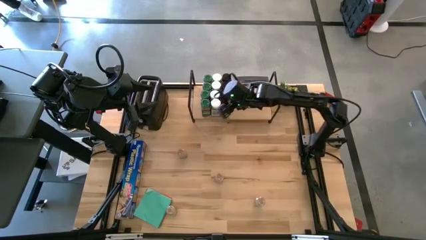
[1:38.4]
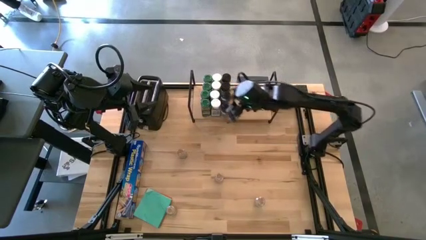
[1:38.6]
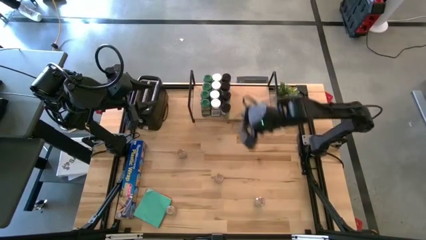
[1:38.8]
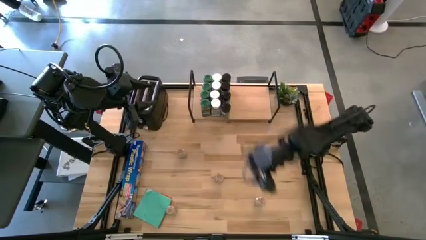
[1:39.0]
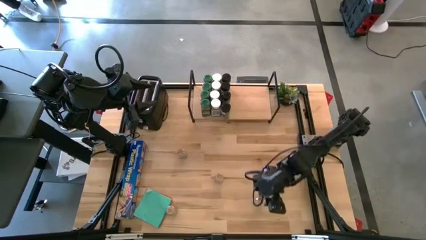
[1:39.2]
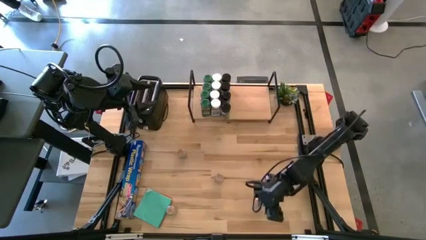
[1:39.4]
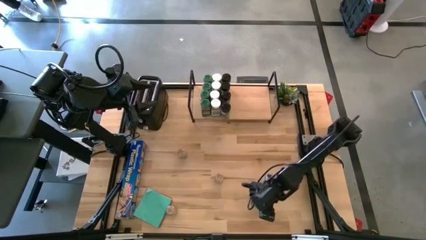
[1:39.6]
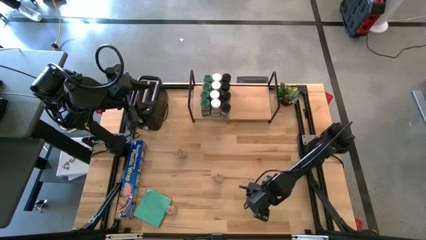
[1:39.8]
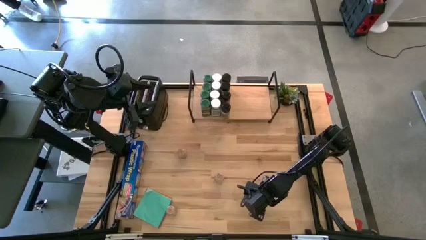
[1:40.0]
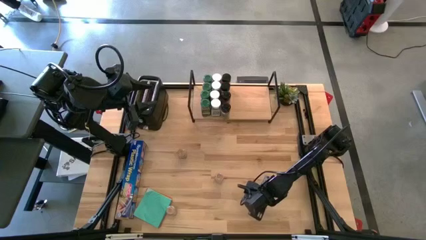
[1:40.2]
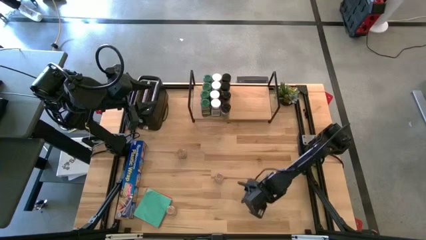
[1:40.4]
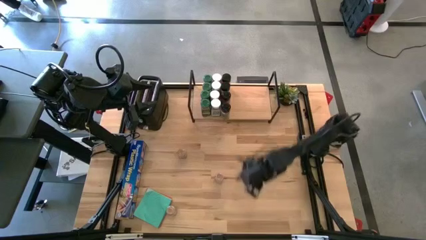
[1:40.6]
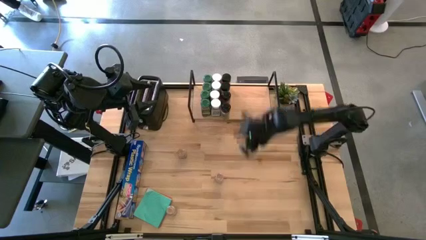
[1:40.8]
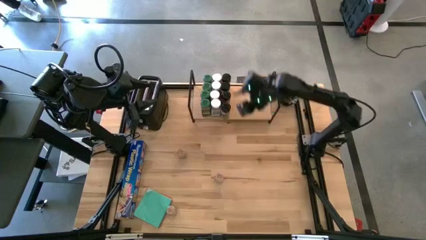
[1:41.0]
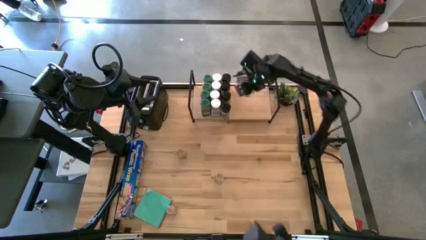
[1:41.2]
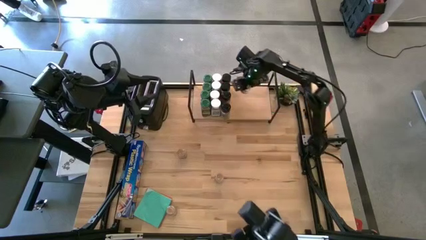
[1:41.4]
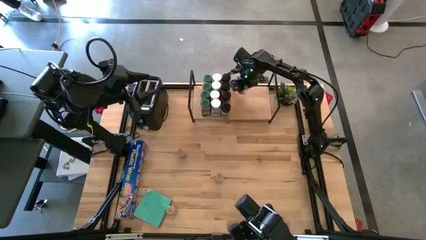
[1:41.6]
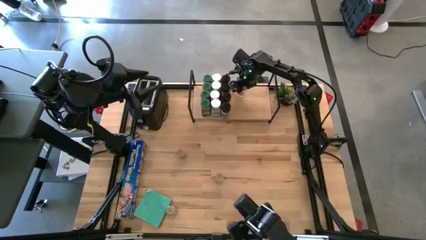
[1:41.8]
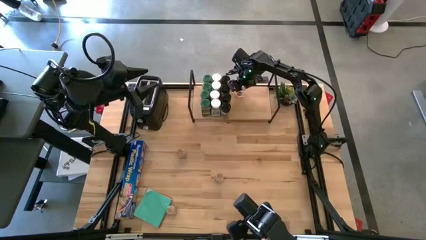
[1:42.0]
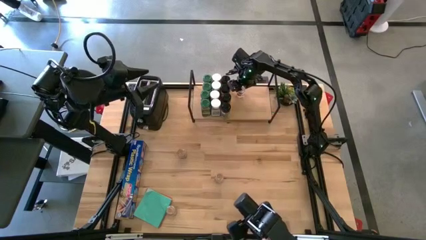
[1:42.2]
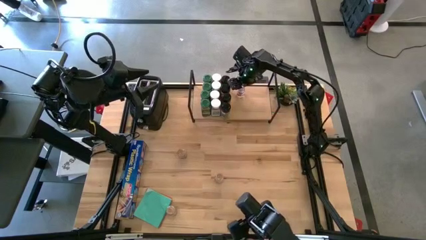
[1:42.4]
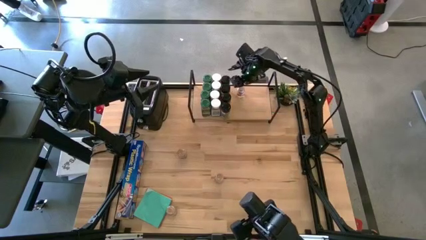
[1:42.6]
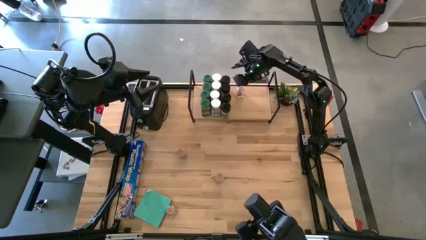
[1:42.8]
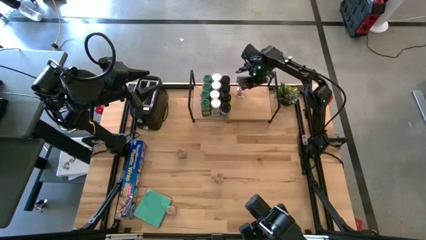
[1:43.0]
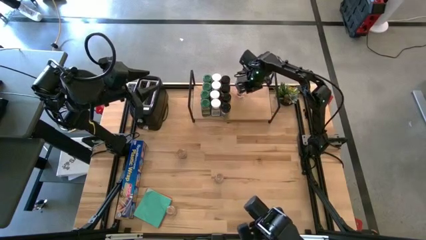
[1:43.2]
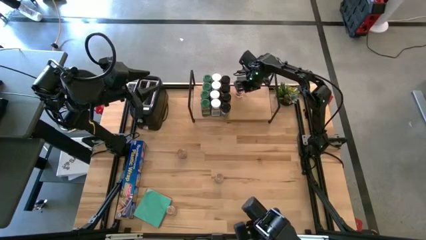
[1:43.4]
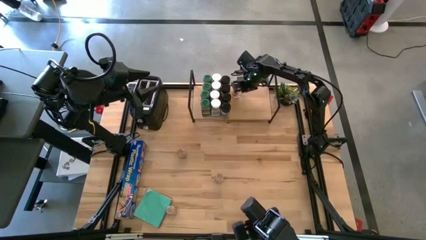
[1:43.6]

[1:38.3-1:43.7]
Task: Shelf spices
Put the bottom right transparent seasoning bottle on the shelf

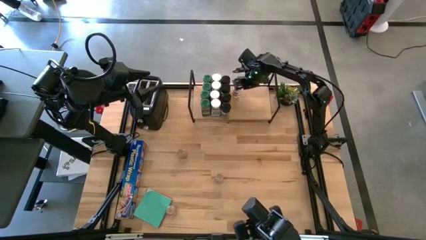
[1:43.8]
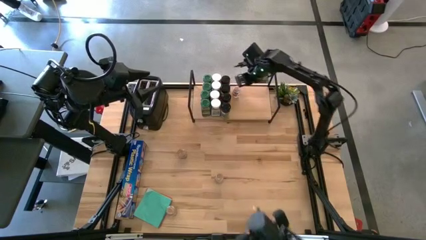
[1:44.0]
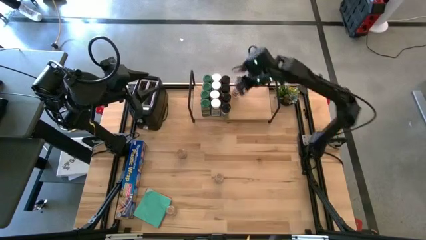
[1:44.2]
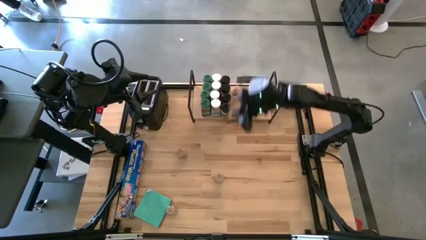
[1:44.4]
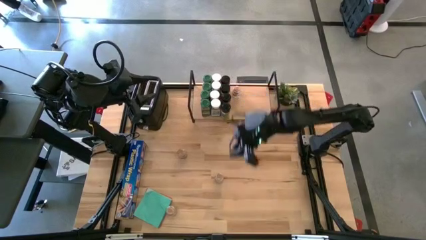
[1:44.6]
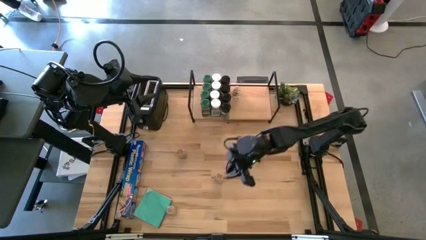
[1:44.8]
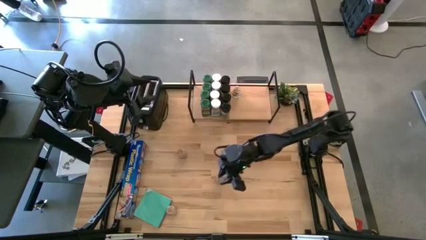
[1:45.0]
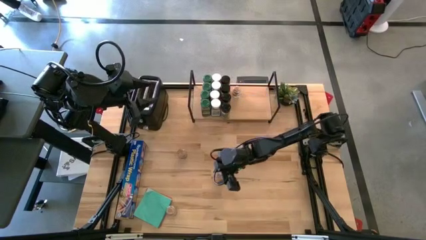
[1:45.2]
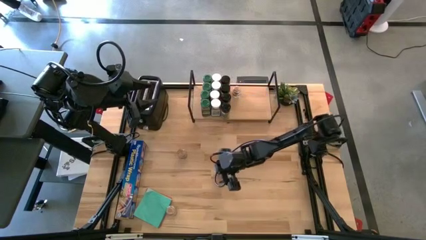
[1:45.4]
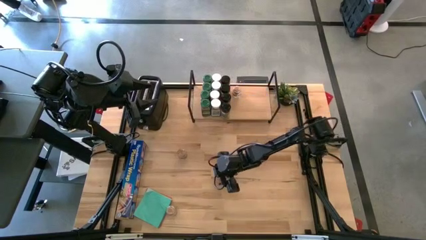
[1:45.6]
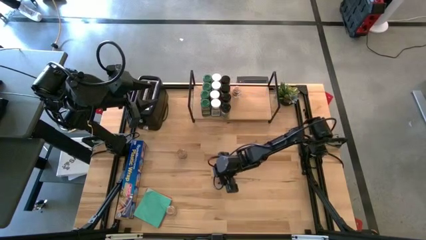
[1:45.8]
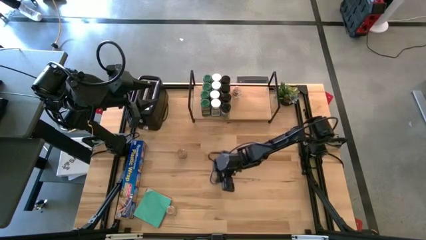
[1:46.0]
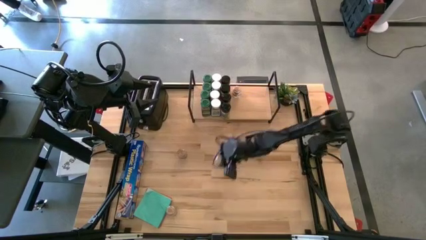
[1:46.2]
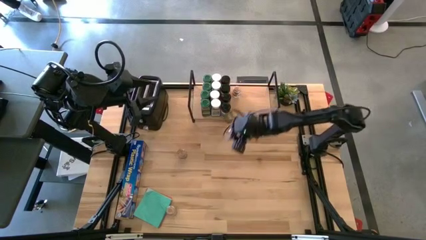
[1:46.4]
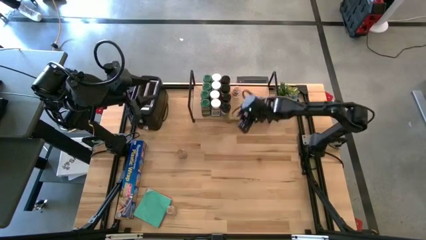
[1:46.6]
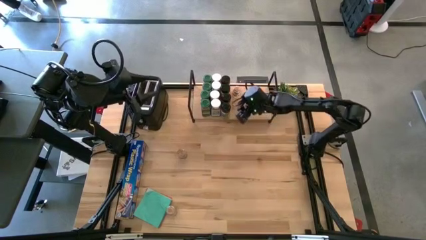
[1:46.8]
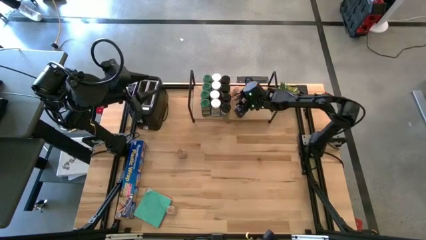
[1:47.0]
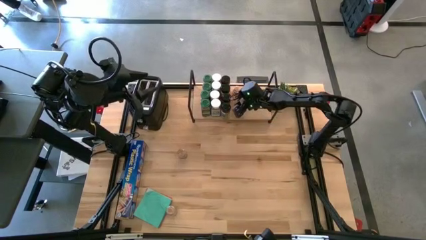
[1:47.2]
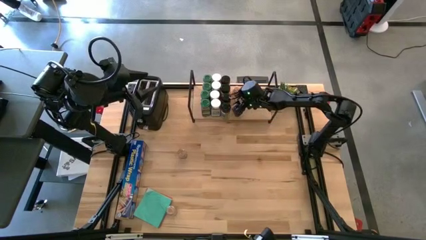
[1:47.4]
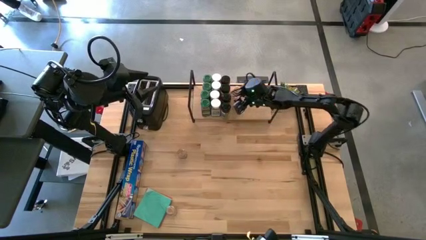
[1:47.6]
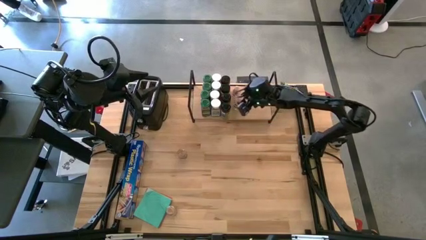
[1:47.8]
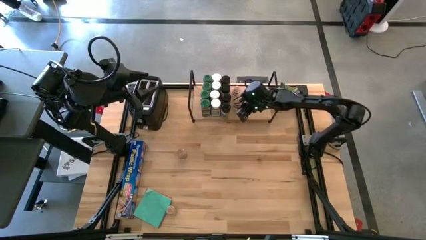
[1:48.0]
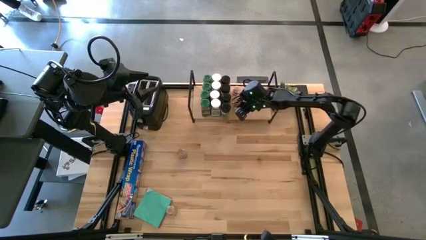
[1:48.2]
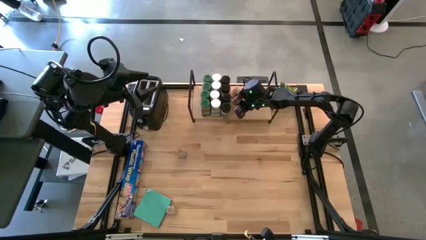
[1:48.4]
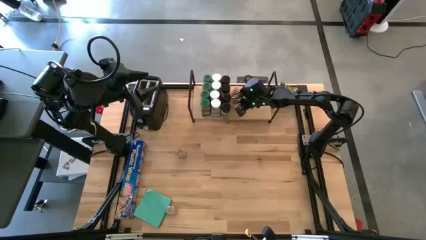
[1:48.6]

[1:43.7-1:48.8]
Put the middle transparent seasoning bottle on the shelf aligned with the other transparent seasoning bottle

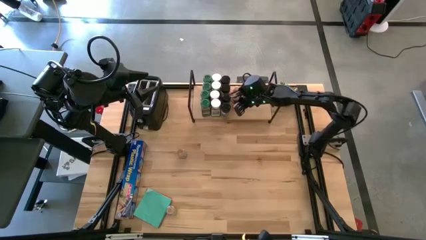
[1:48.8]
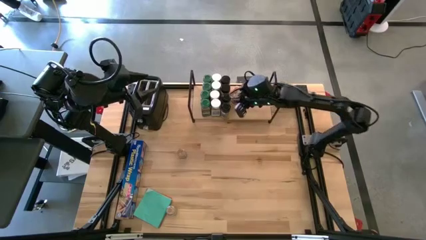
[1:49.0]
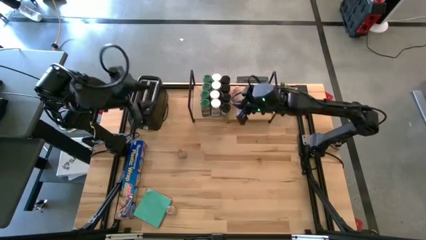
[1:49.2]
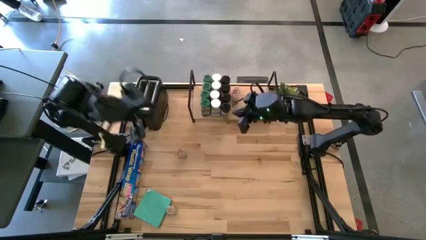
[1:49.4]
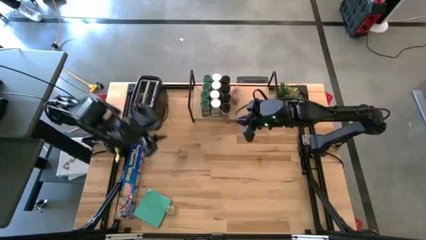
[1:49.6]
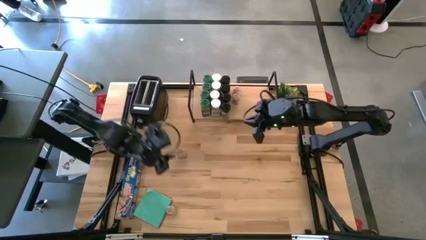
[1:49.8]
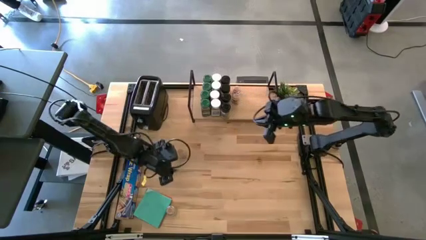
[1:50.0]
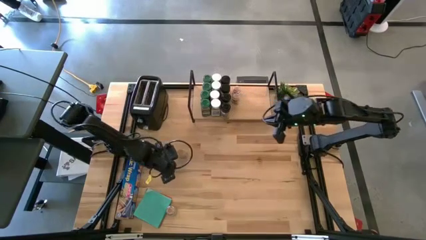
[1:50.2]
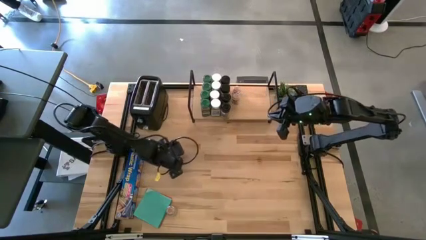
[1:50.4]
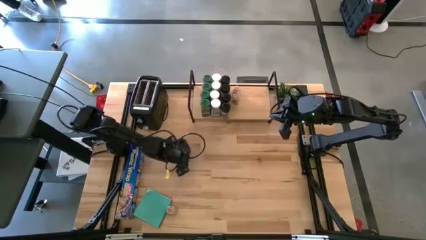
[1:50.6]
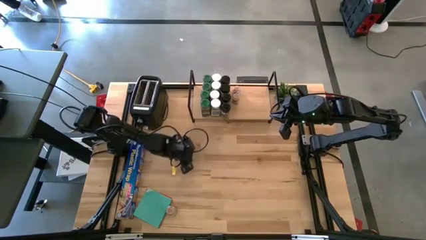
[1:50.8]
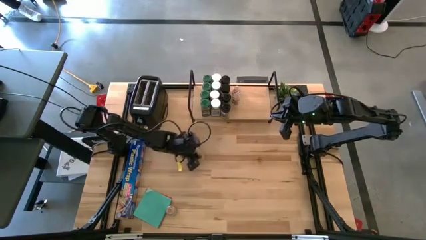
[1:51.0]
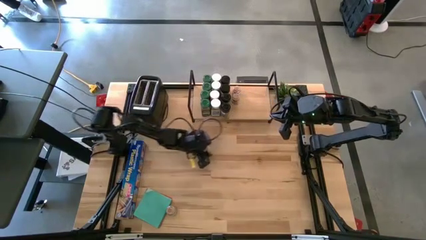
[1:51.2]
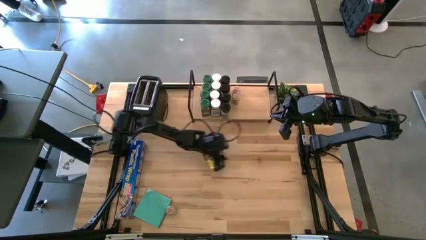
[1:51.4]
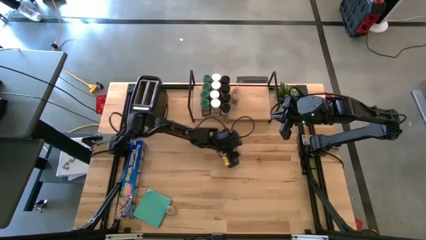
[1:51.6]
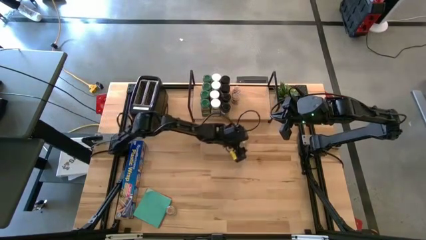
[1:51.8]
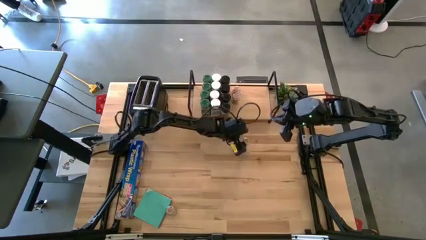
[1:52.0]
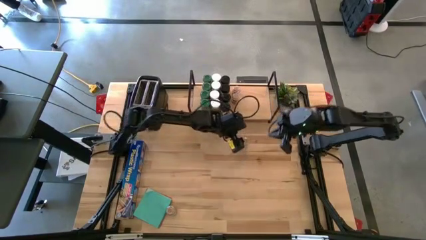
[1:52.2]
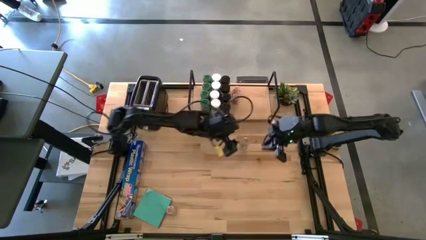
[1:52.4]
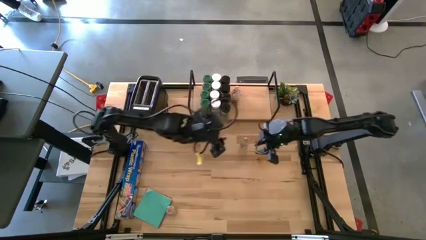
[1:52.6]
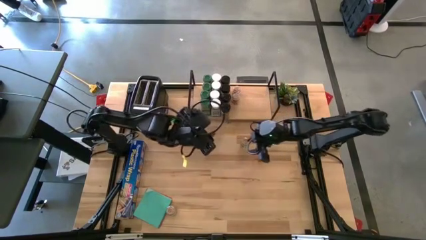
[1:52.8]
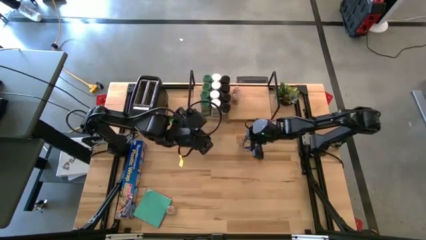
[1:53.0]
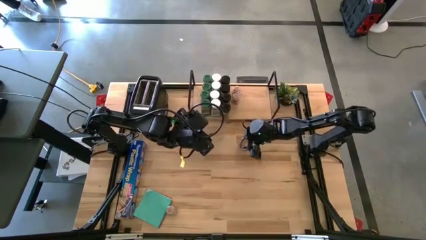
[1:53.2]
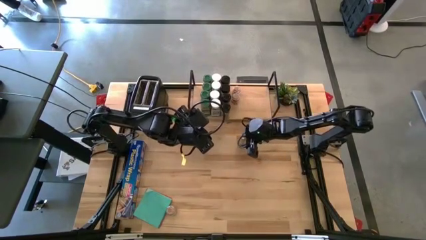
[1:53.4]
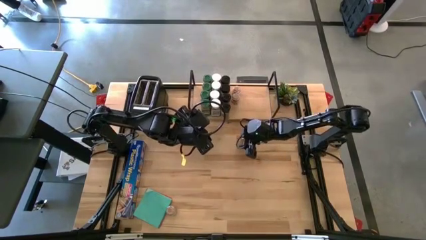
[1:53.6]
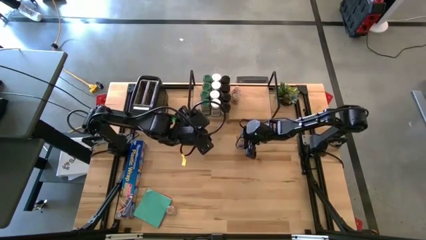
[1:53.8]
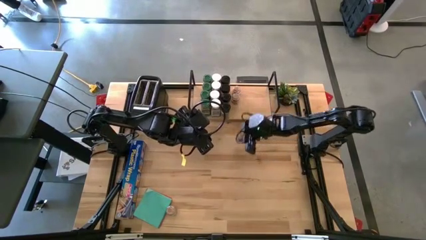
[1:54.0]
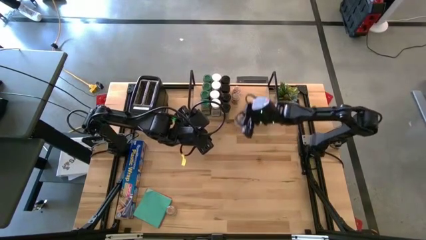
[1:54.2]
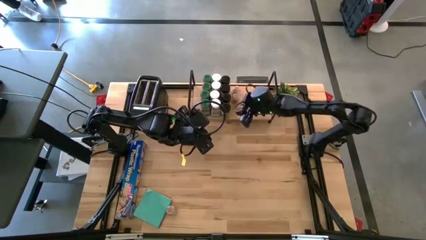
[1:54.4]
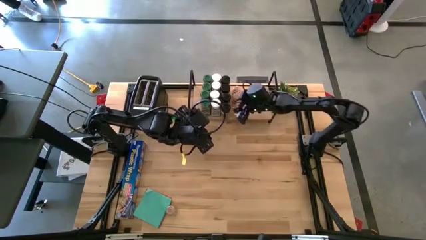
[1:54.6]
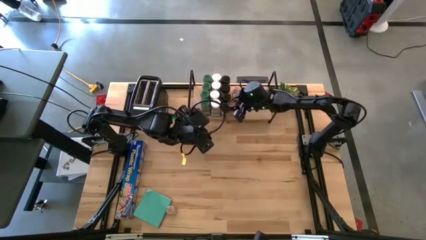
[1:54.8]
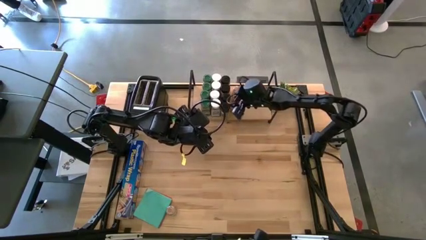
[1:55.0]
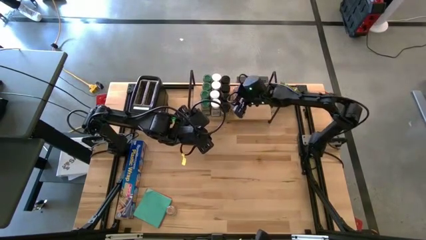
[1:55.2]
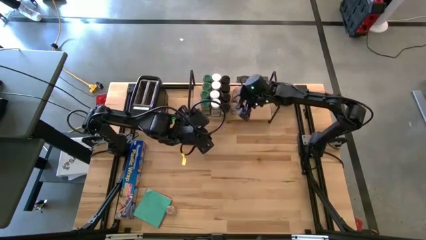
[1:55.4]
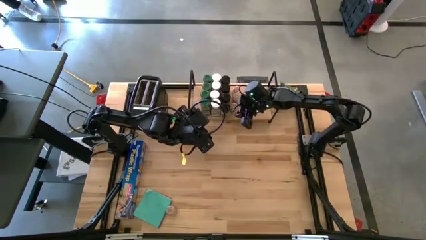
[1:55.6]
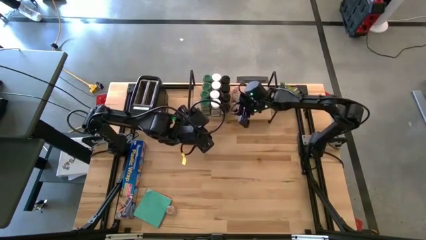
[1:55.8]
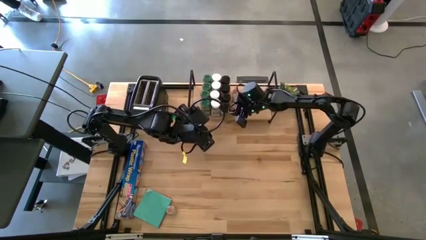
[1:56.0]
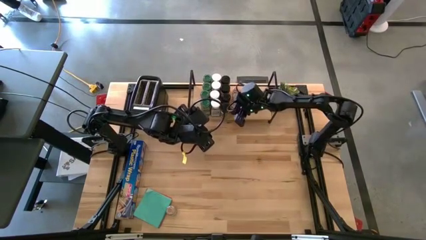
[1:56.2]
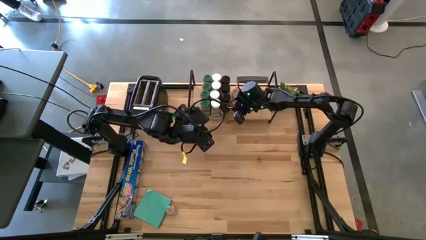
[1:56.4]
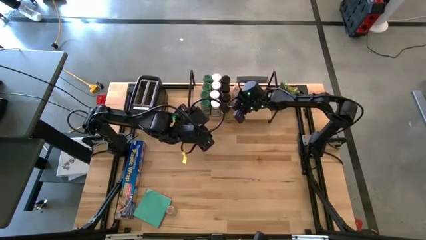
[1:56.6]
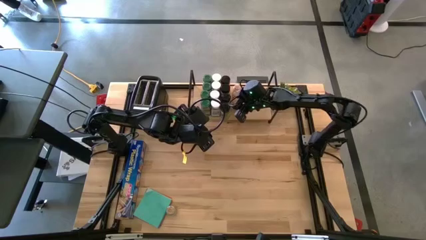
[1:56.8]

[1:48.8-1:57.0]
Put the top transparent seasoning bottle on the shelf aligned with the other transparent seasoning bottles
